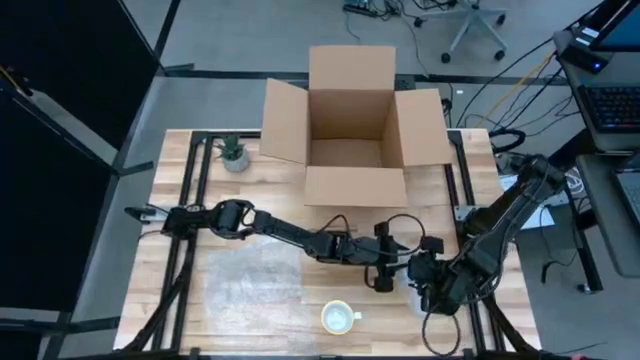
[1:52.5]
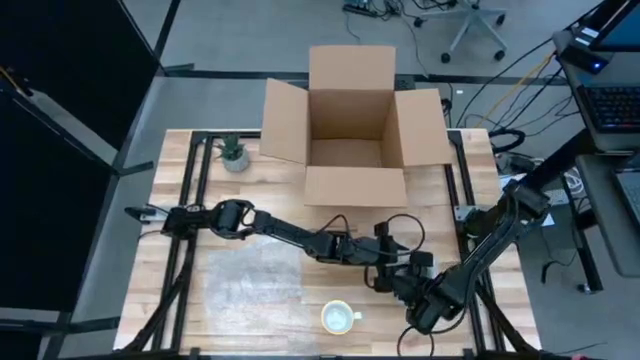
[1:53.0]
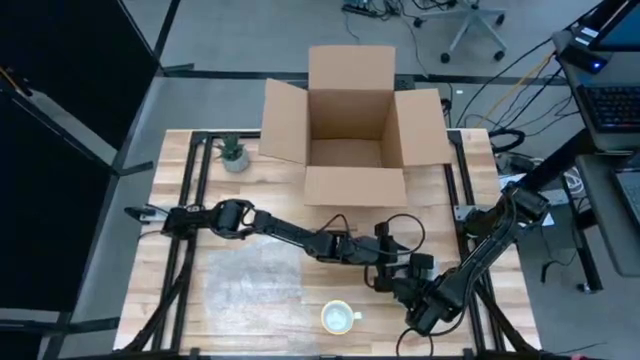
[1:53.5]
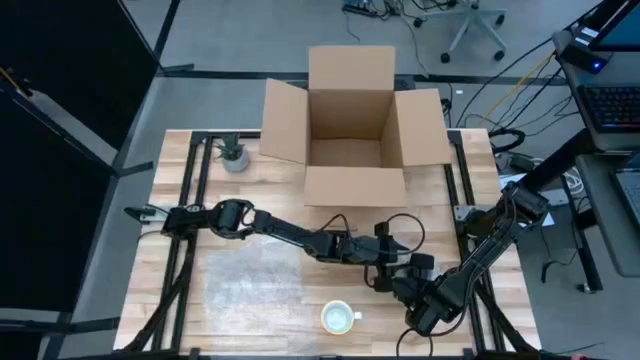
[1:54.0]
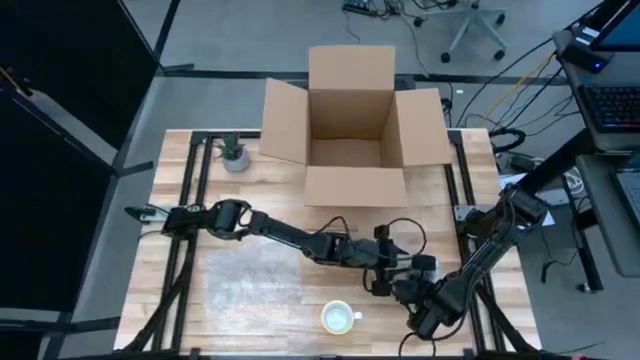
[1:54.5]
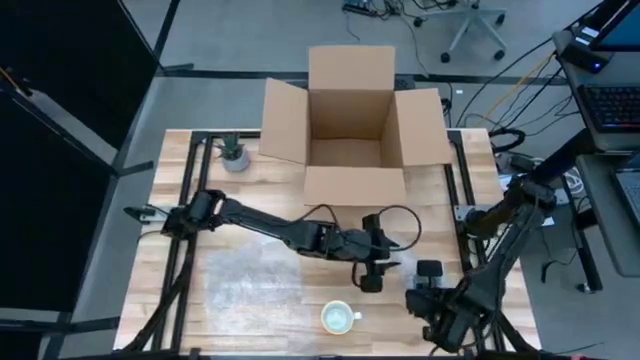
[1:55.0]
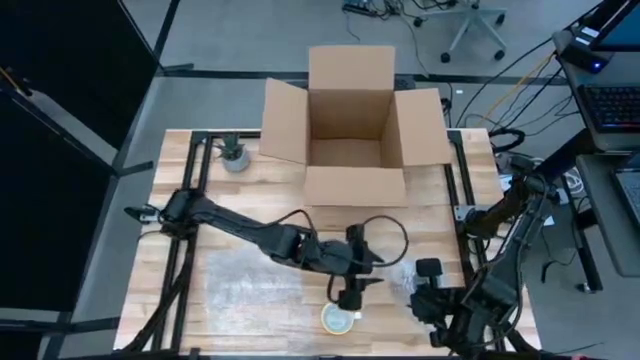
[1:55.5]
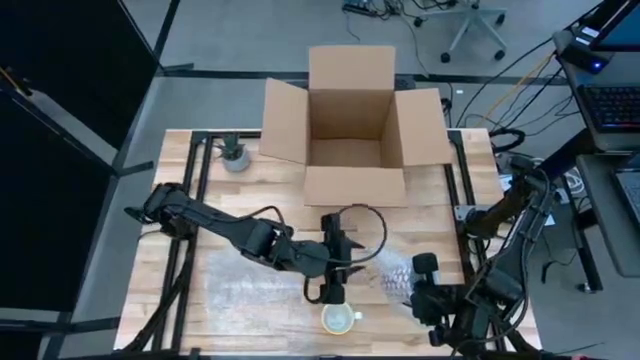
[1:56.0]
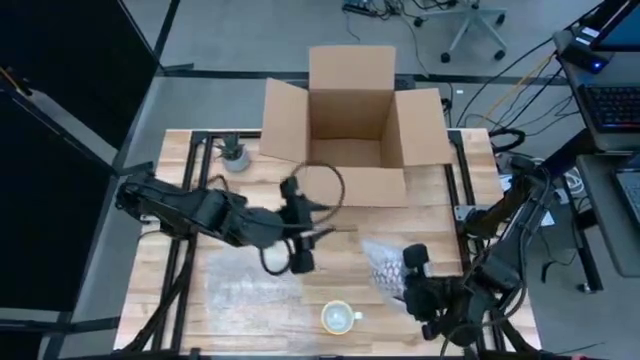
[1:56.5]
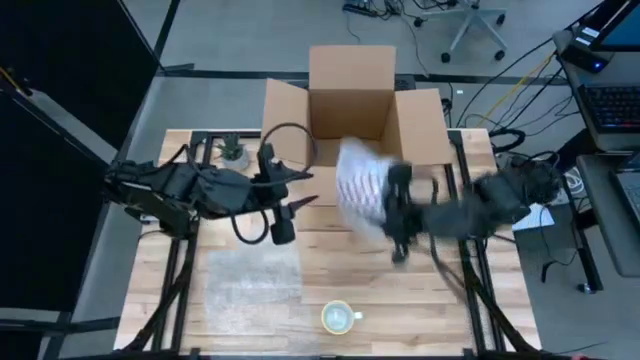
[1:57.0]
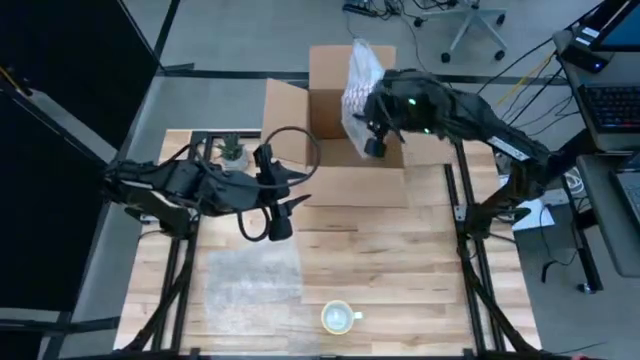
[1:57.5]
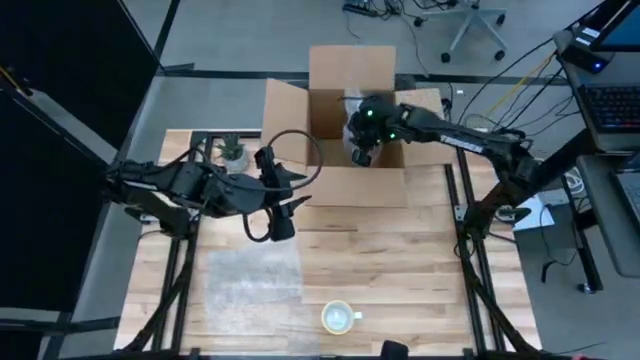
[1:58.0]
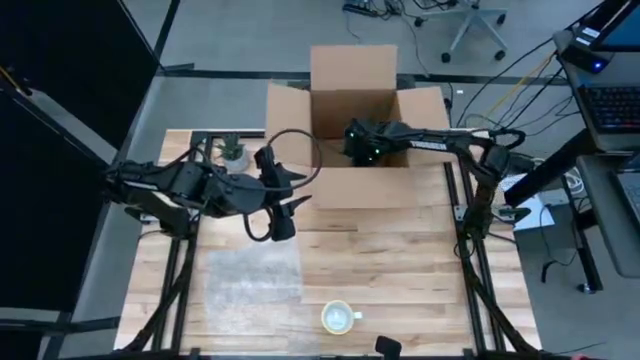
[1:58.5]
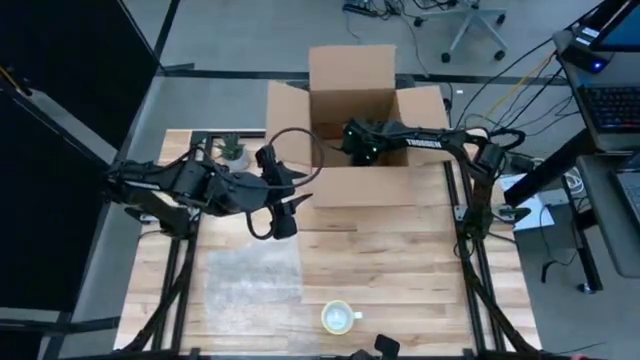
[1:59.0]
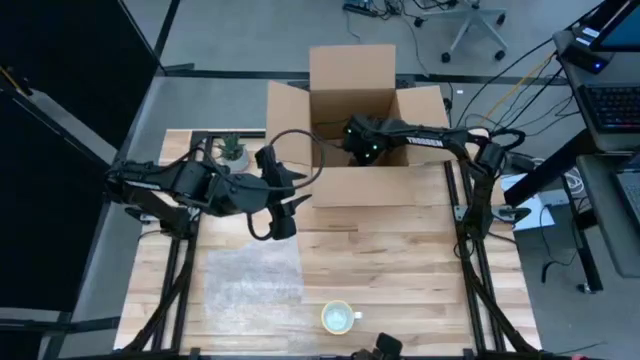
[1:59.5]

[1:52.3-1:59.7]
Task: wrap mug
Put the wrapped red patterned mug into the card board box

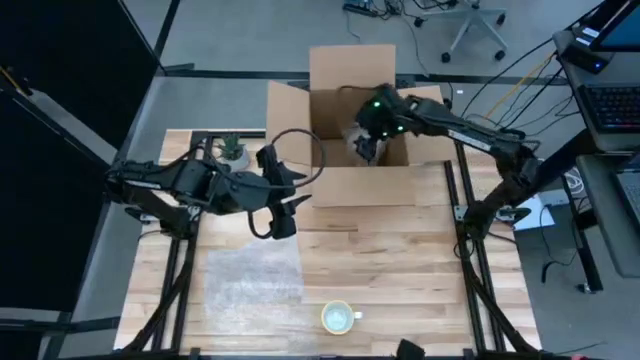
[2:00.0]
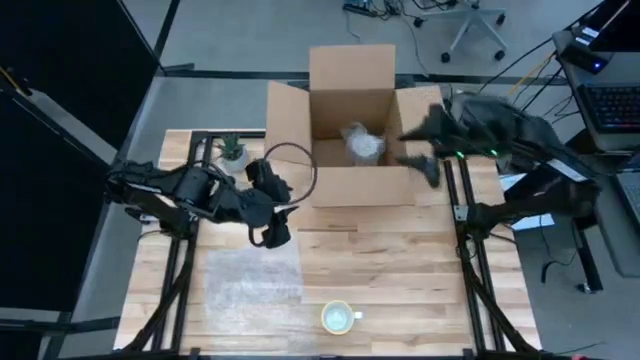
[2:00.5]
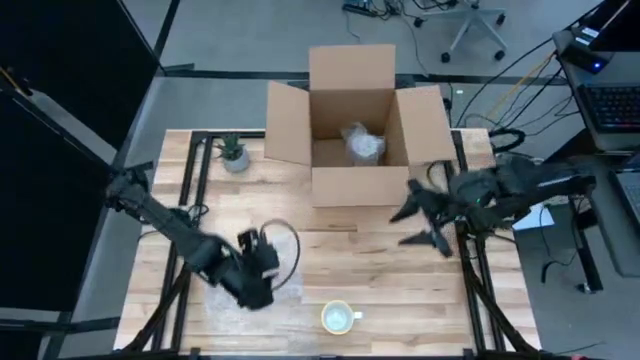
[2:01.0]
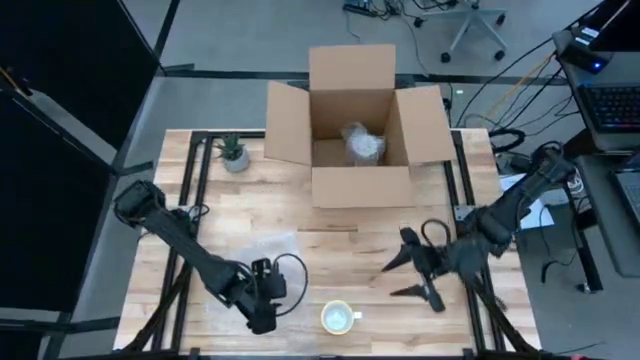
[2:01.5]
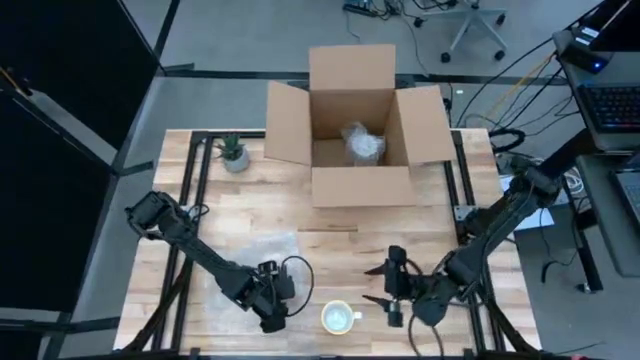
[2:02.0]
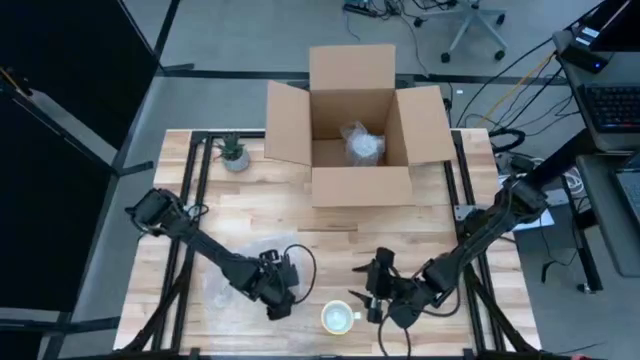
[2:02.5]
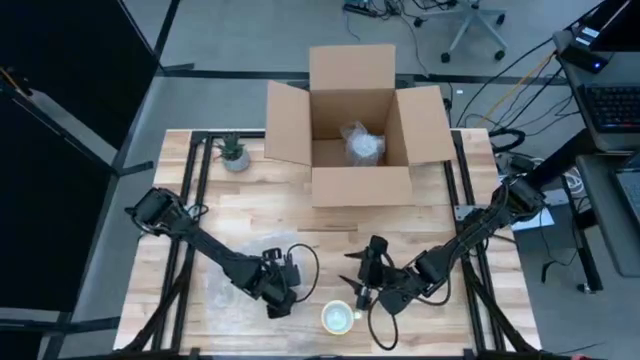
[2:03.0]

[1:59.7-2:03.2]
Wrap the orange patterned mug with bubble wrap

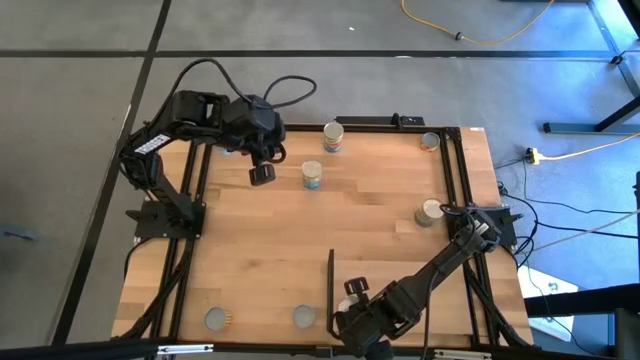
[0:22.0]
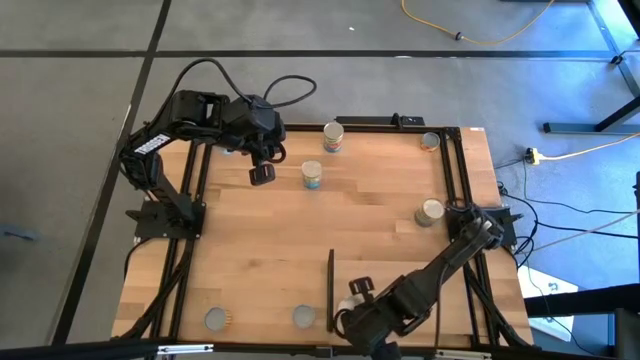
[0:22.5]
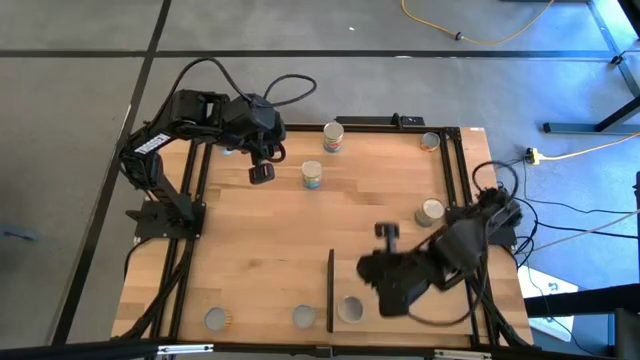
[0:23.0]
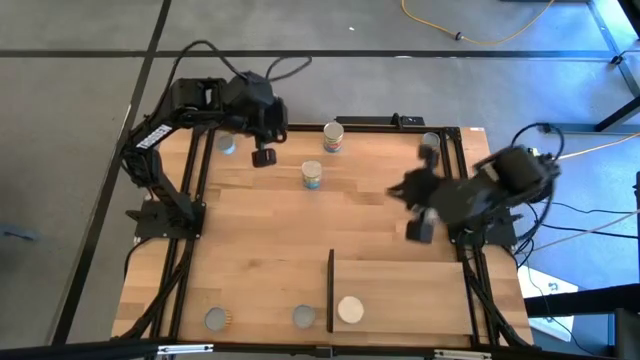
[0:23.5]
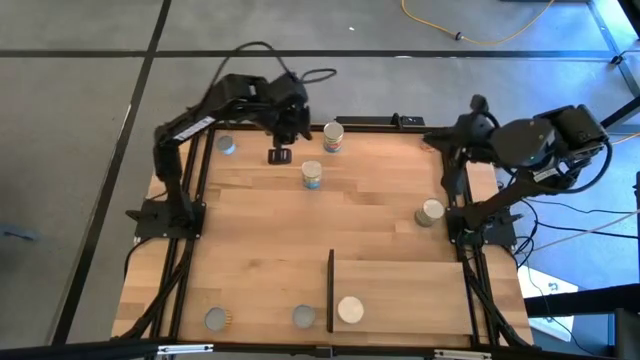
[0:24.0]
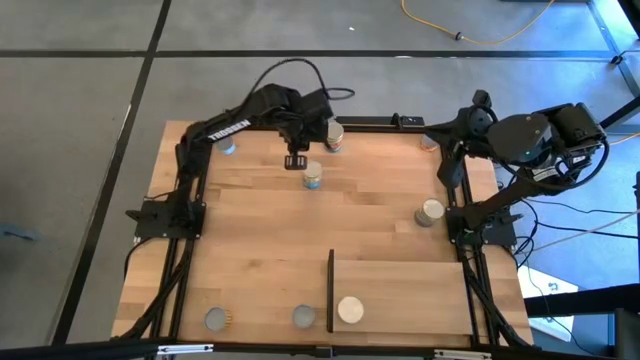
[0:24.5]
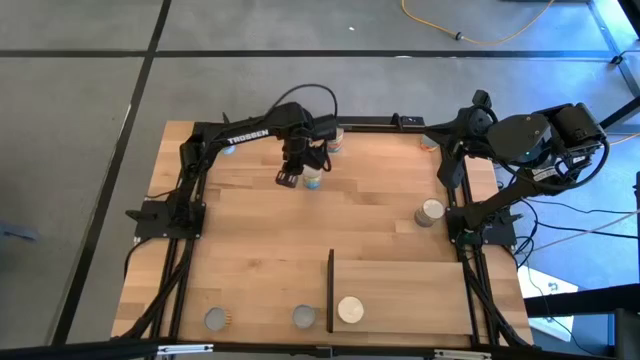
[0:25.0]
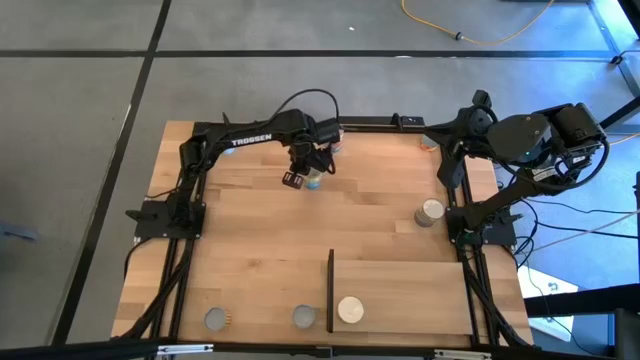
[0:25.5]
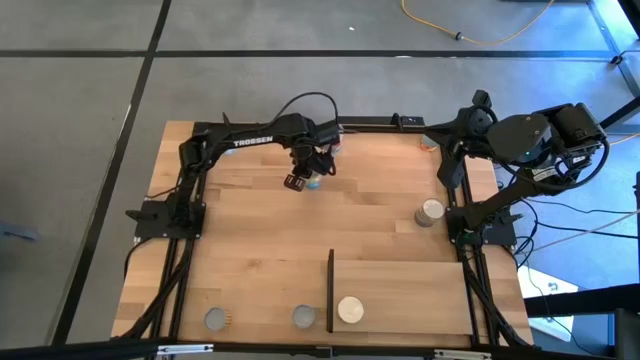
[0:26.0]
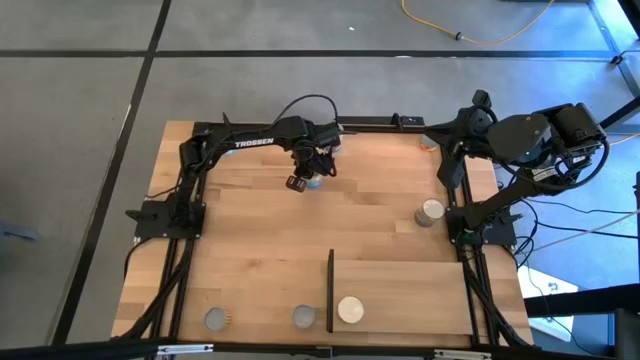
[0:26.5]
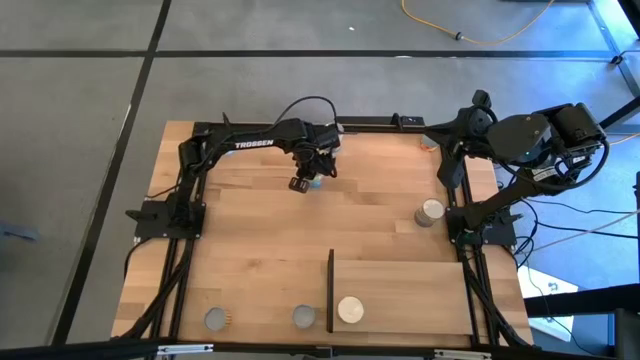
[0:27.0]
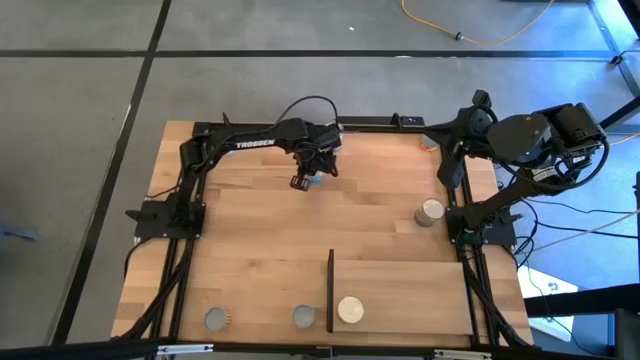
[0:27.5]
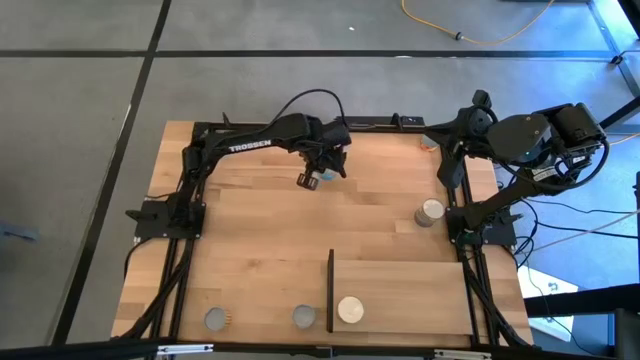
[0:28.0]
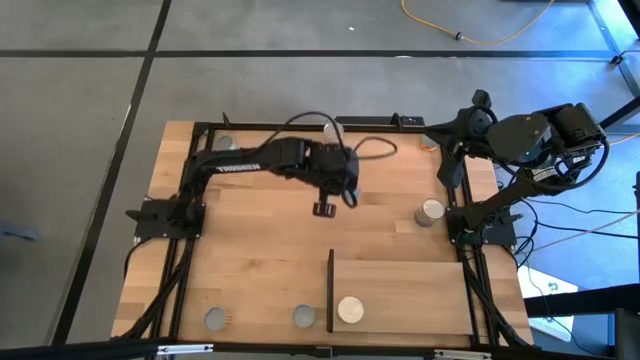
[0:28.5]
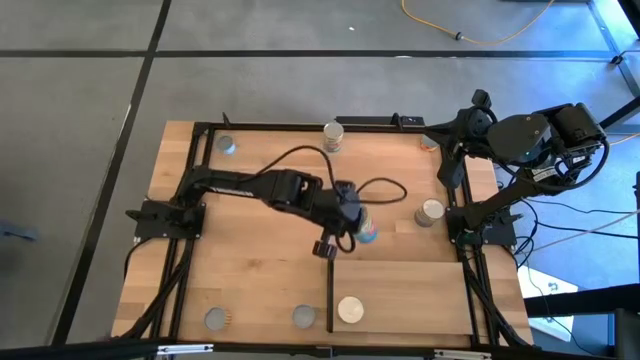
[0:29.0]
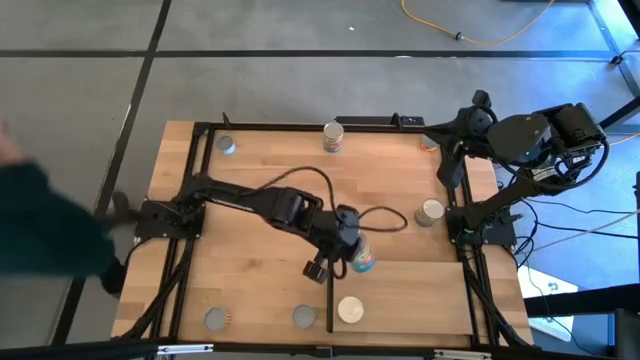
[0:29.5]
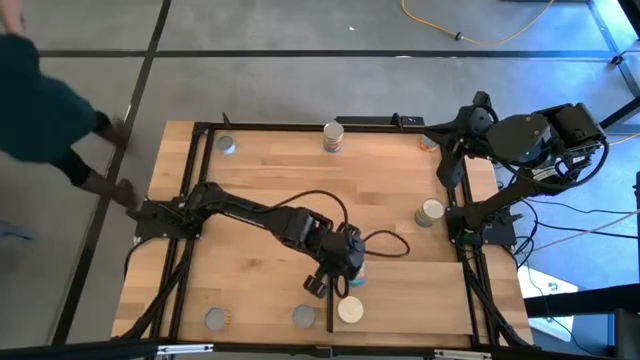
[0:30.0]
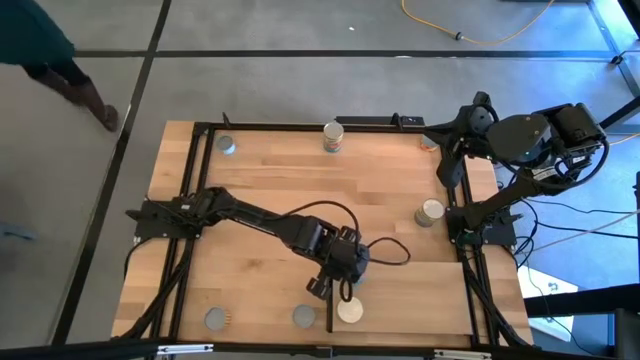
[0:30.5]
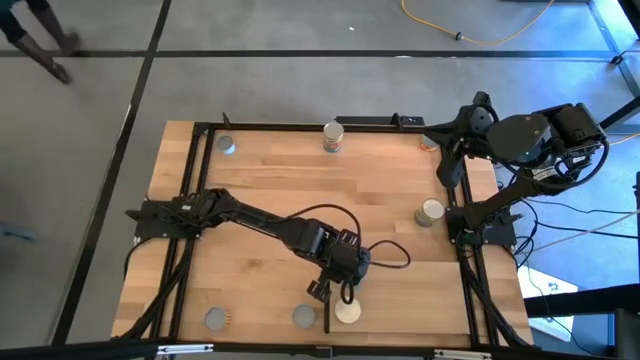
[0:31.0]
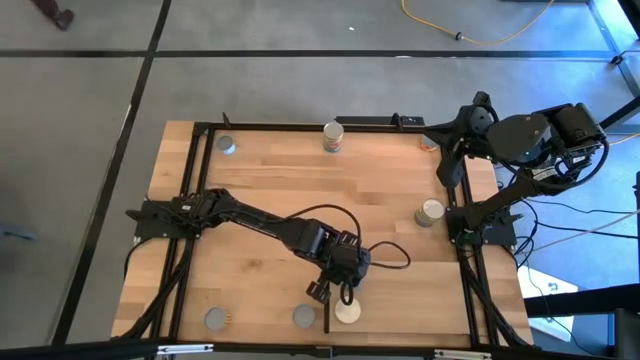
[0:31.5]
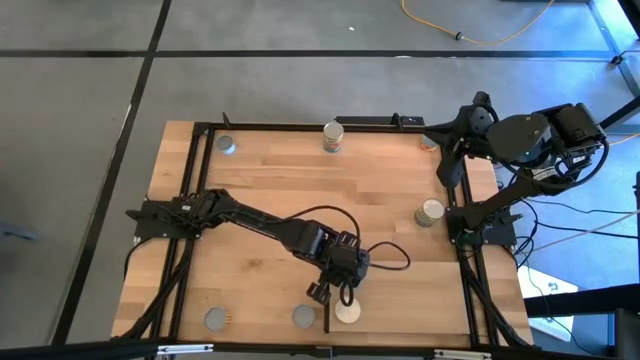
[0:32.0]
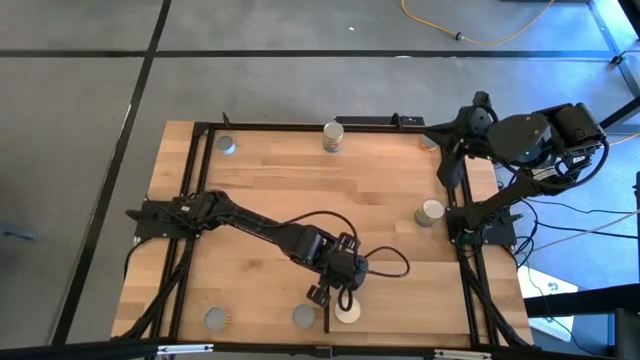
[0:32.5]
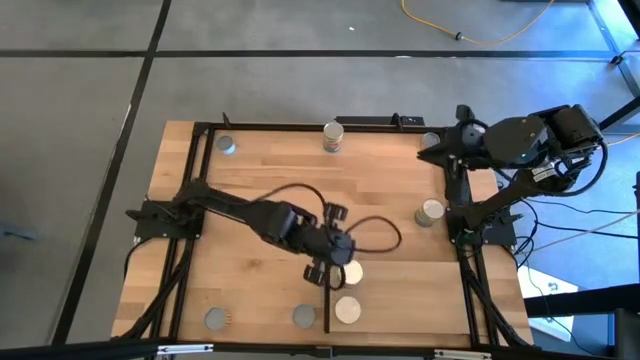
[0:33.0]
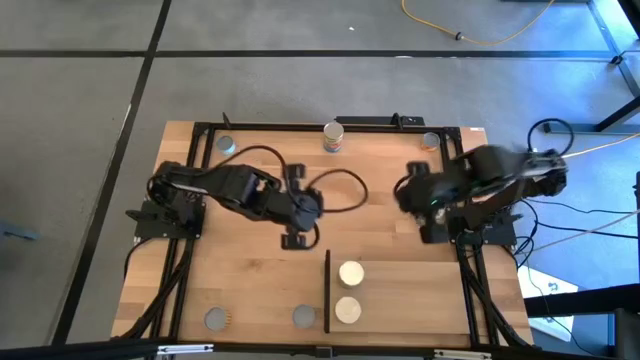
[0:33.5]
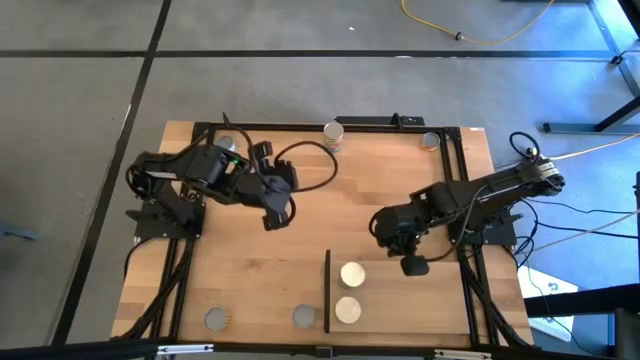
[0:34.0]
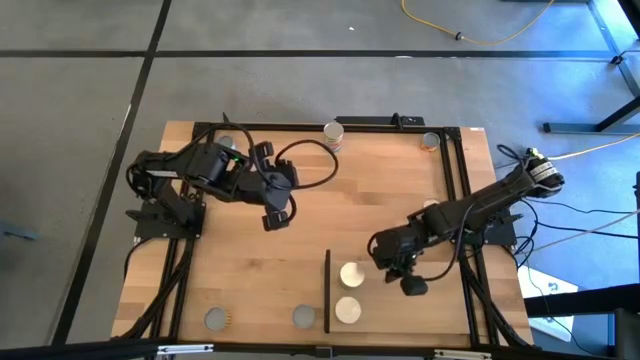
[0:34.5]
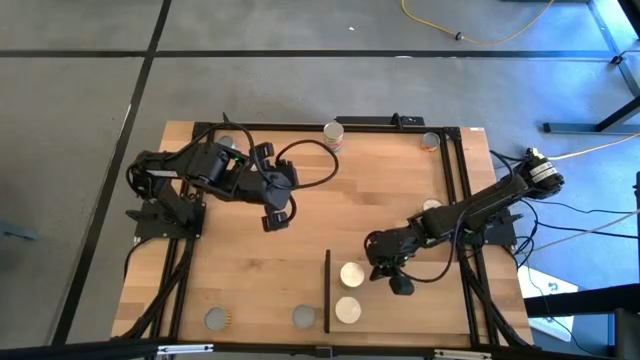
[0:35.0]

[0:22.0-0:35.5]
Task: Pick and place cans onto a shelf
Put the bottom canned tomatoes on the shelf
